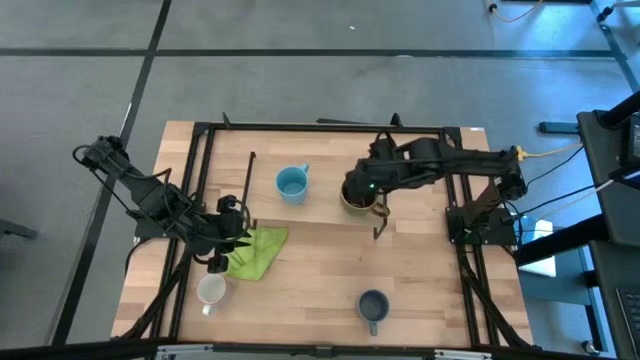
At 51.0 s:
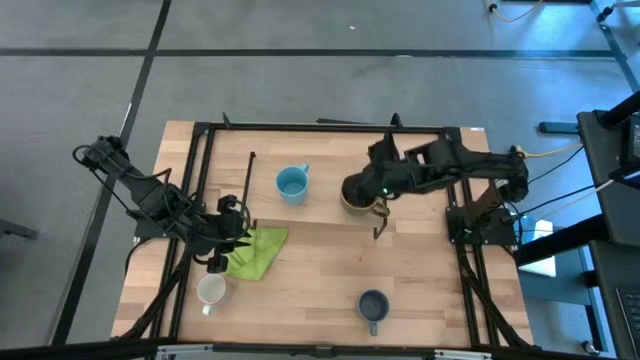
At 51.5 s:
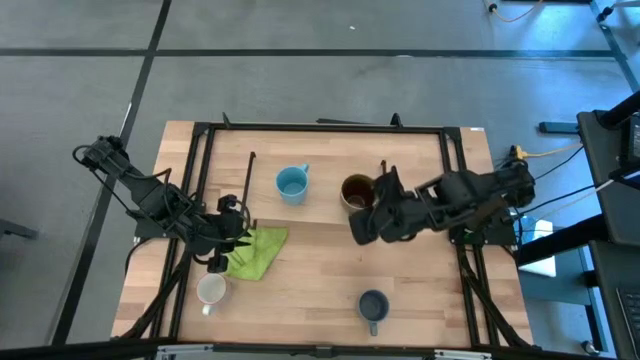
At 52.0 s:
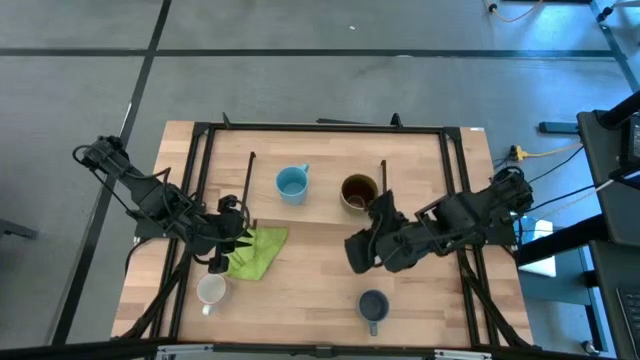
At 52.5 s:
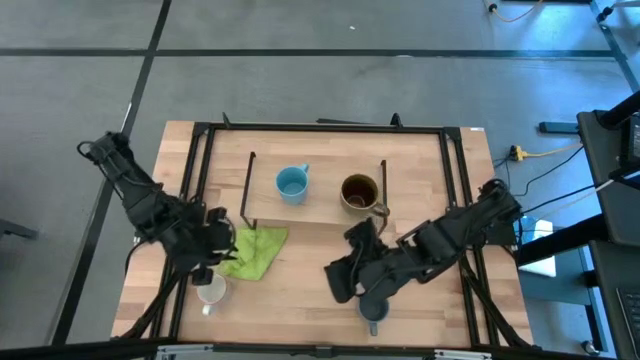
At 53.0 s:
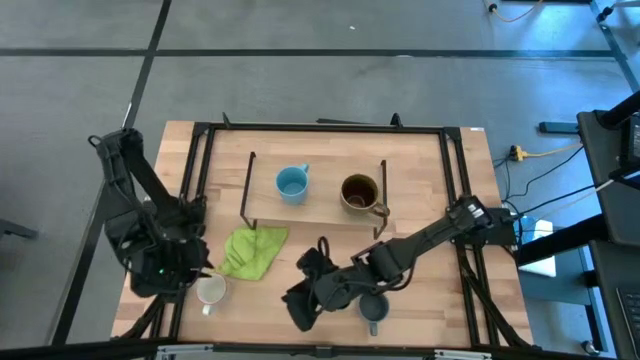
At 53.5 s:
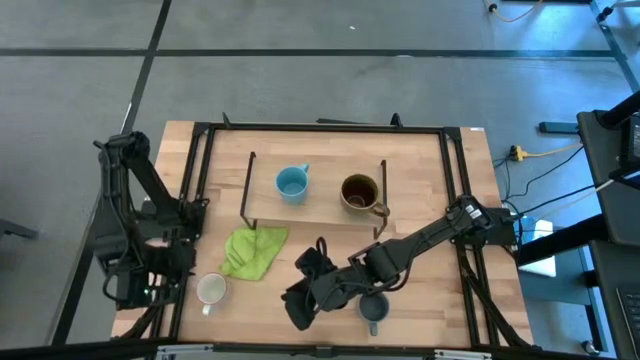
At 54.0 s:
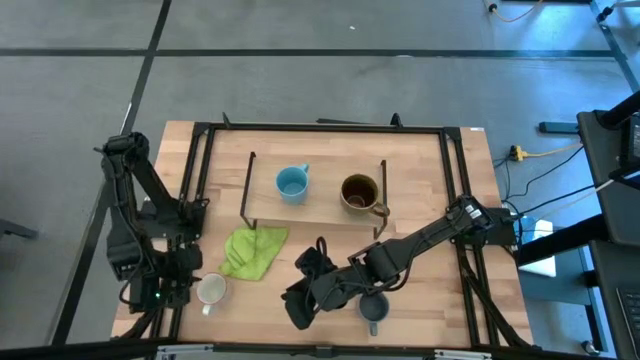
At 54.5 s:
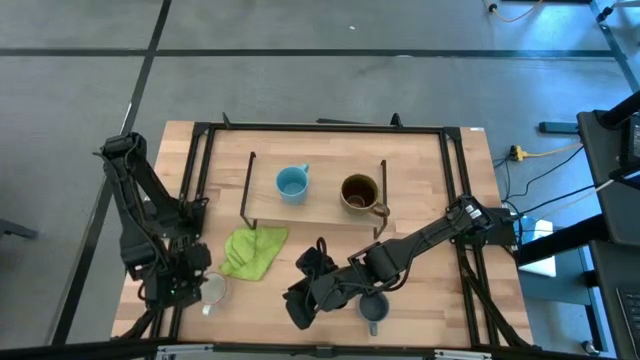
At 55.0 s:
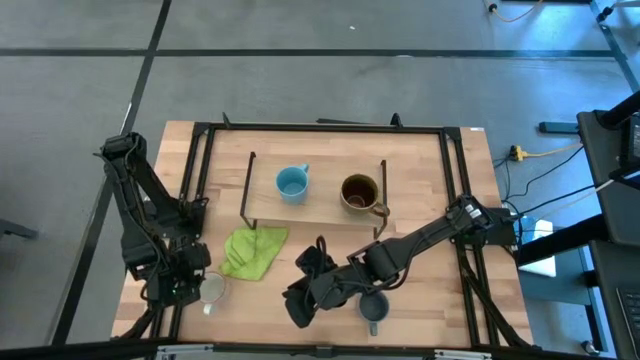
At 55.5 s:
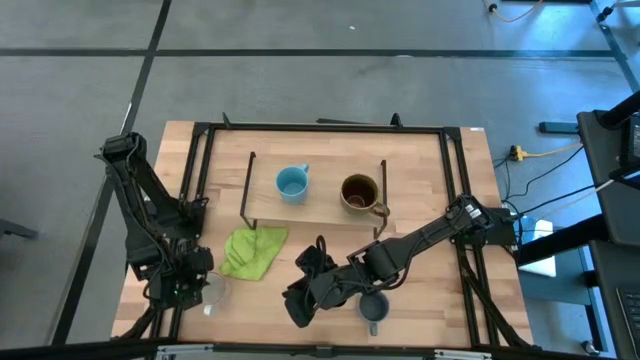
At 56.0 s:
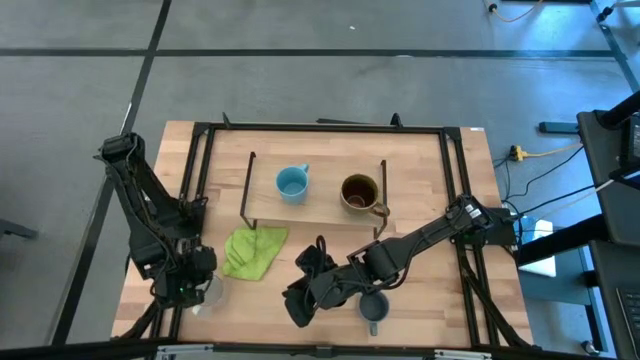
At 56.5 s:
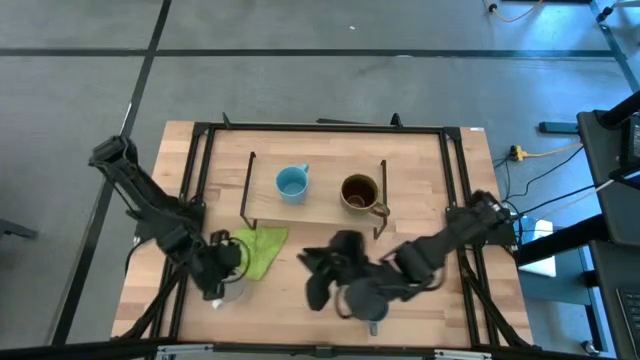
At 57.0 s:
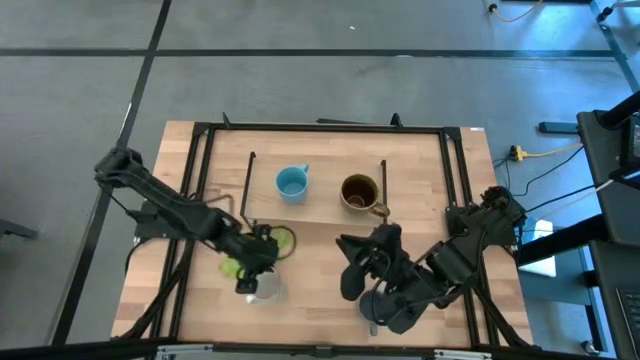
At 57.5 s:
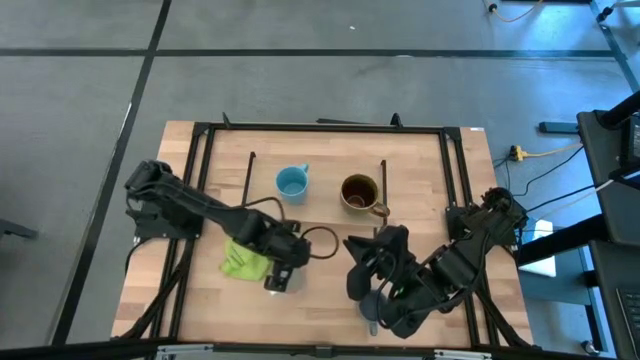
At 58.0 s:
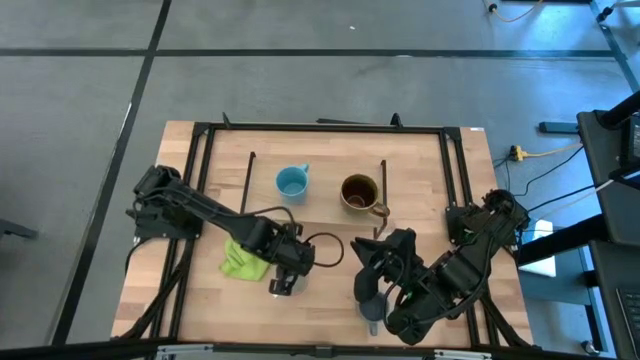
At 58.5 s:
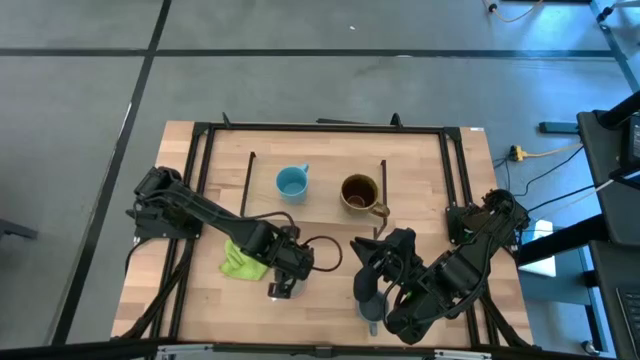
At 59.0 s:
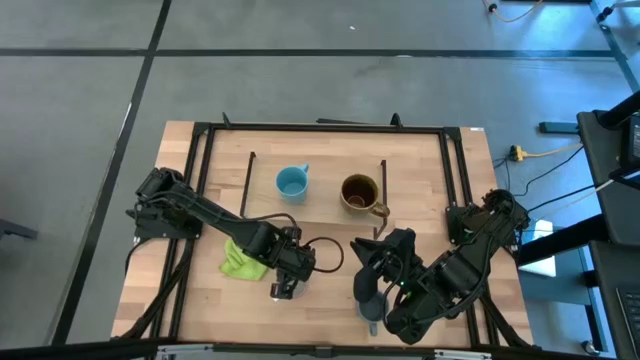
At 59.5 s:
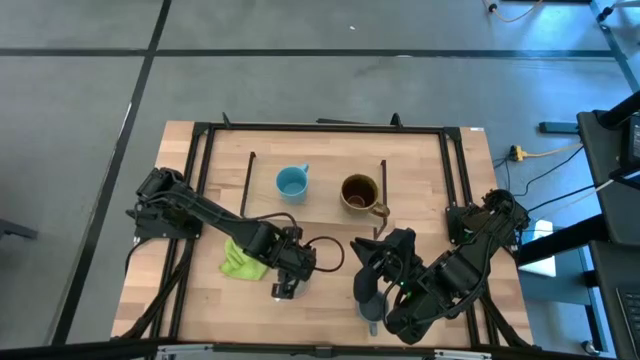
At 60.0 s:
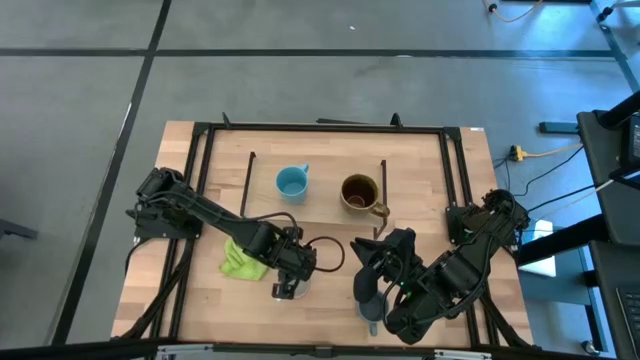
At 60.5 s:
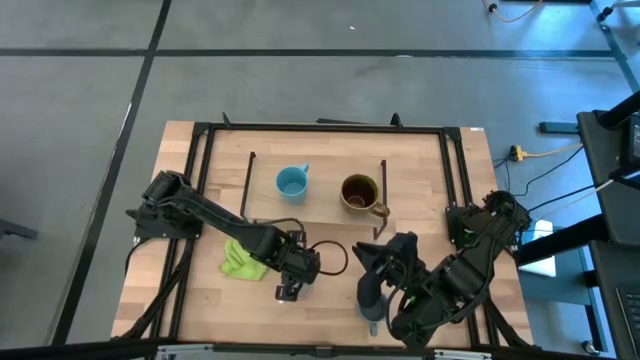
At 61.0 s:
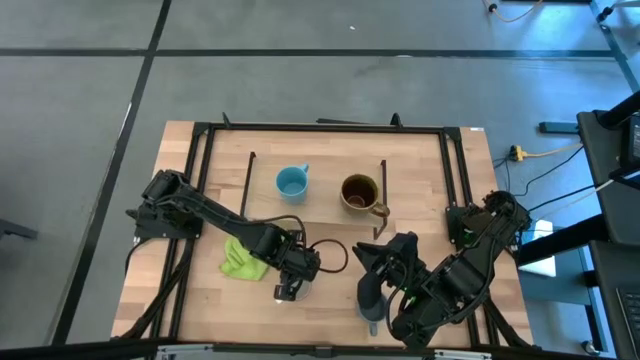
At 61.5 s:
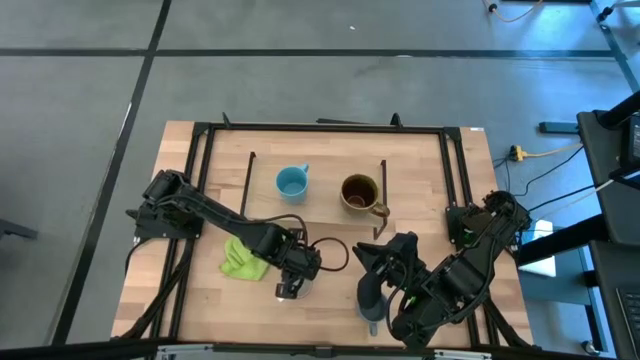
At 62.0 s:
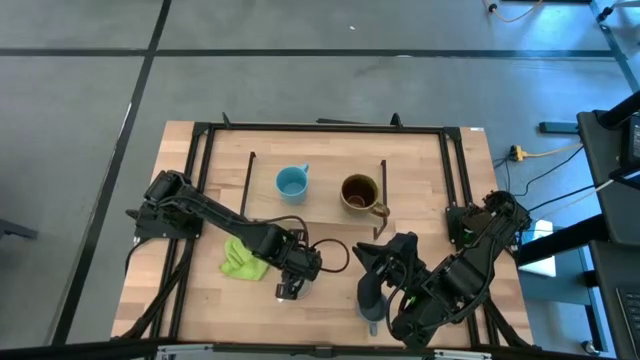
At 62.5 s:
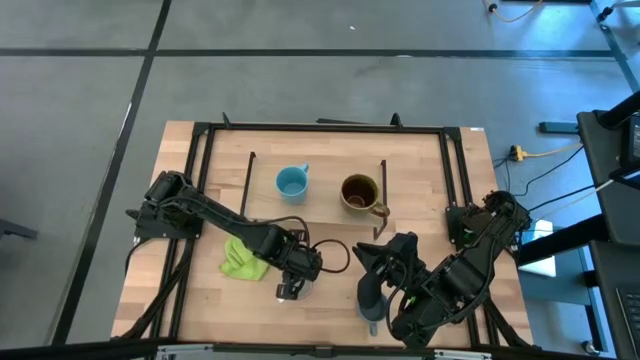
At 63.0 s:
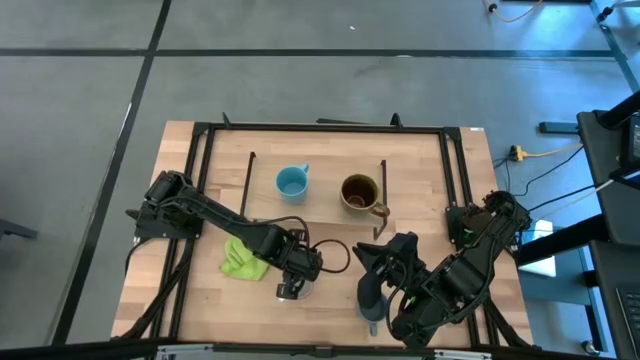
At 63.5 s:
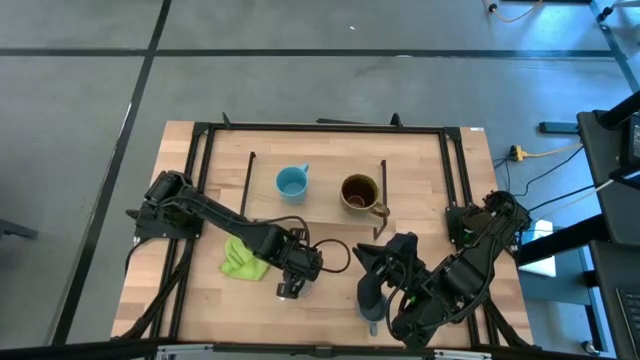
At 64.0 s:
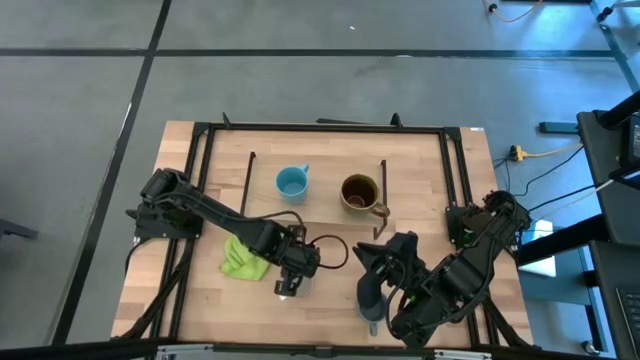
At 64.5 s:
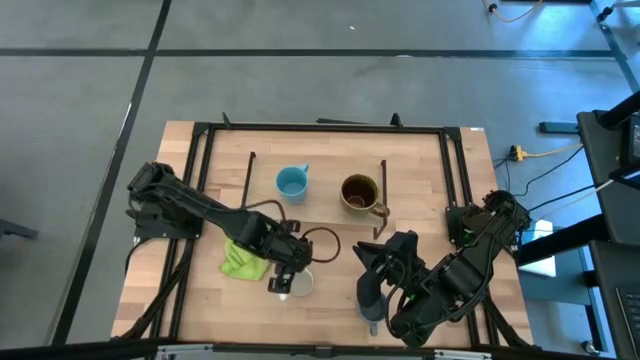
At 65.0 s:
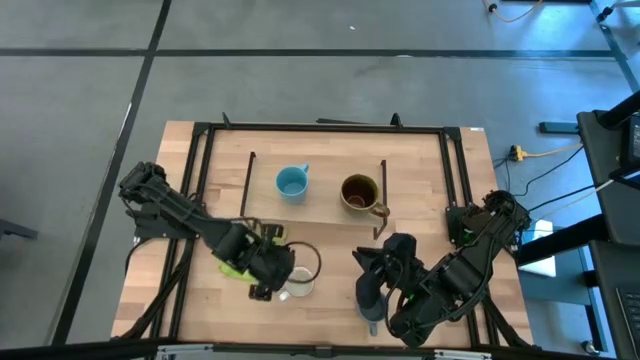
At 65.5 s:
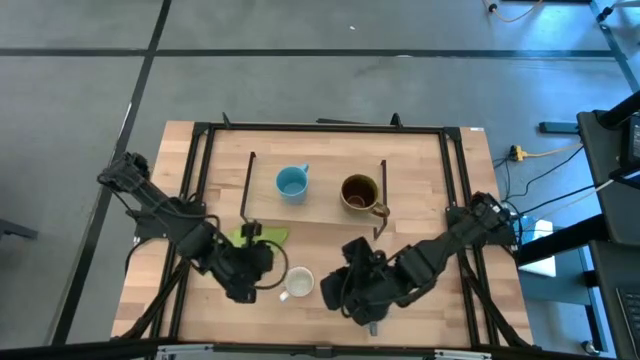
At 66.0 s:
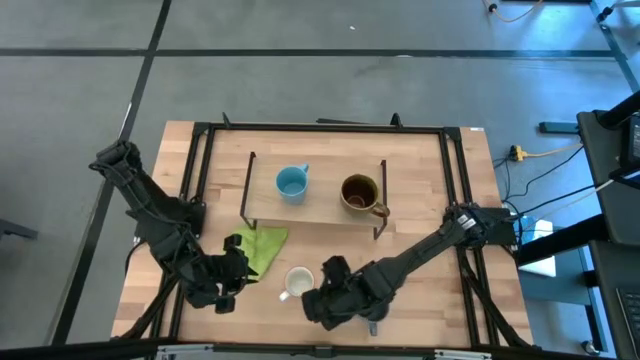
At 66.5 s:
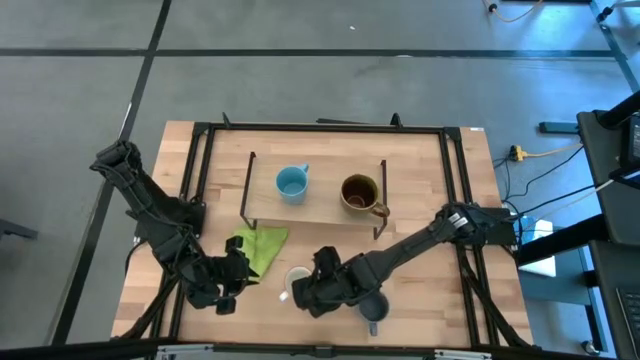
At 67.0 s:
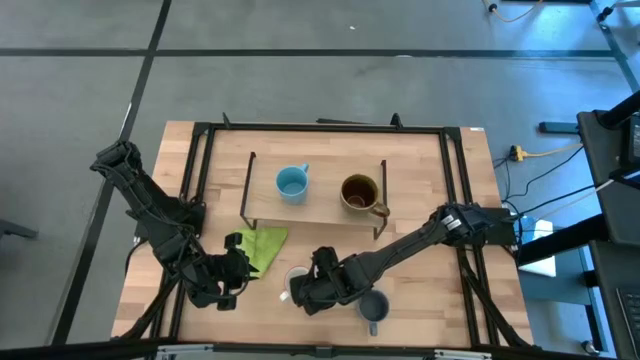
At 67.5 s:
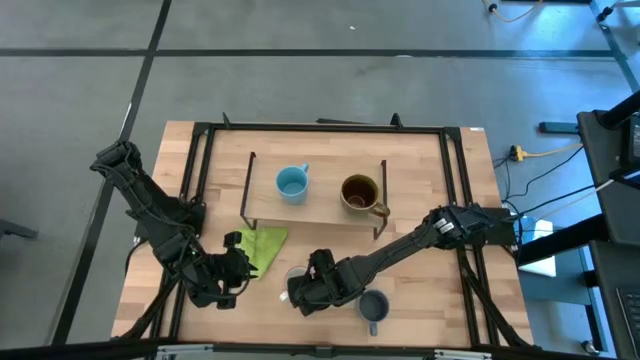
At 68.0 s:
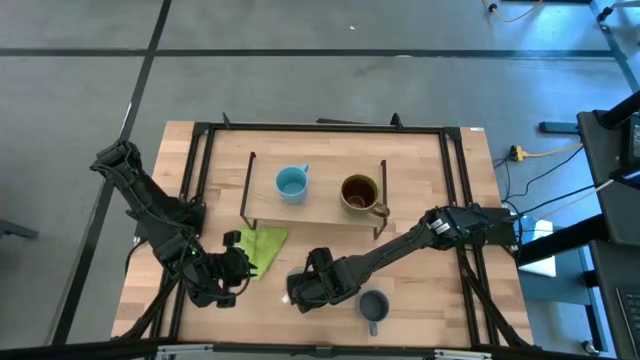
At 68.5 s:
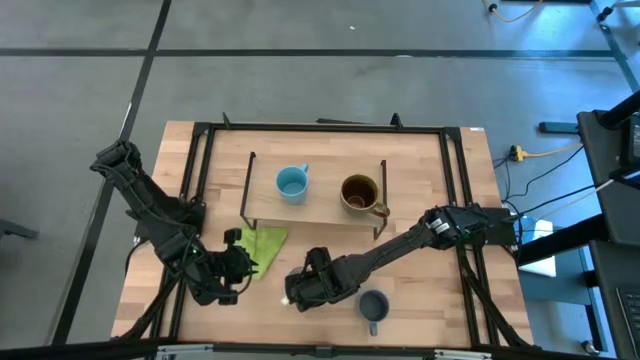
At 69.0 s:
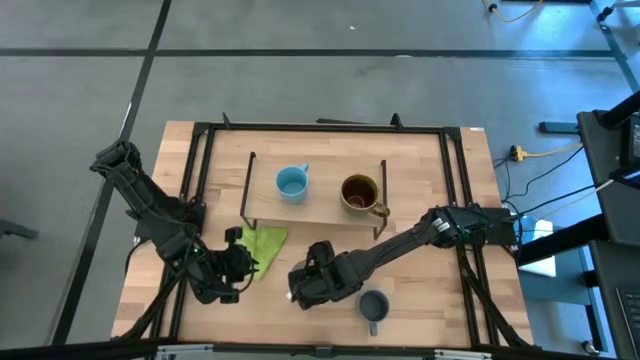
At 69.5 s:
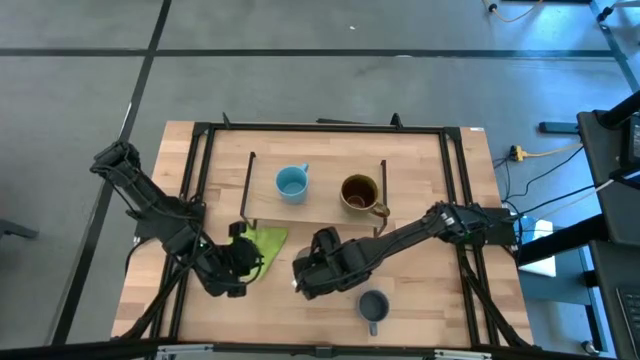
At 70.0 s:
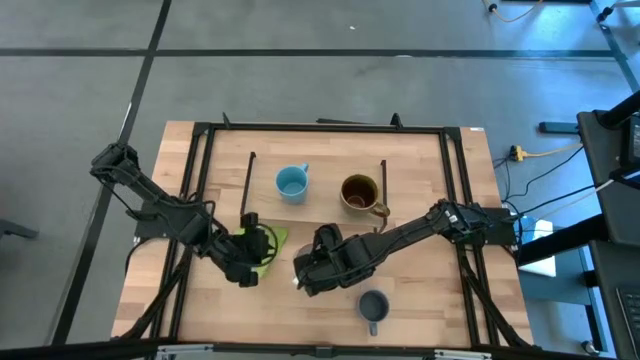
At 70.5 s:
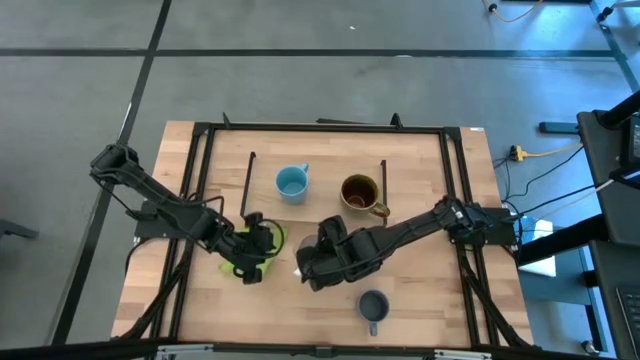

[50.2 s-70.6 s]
Task: Stack small to large cups/mugs on shelf
Put the gray patterned mug on the shelf
